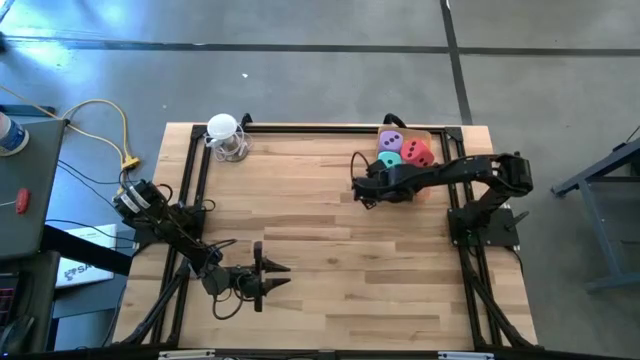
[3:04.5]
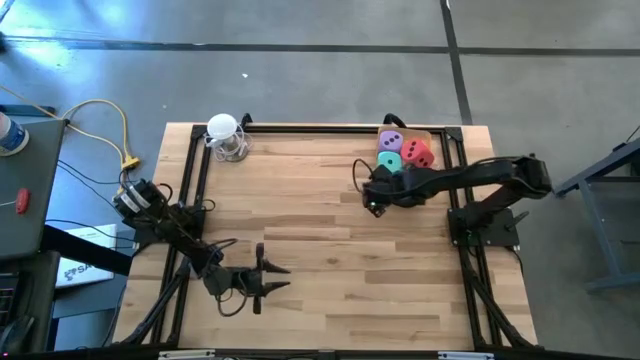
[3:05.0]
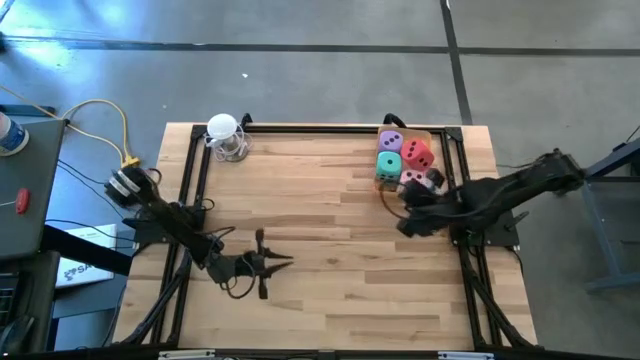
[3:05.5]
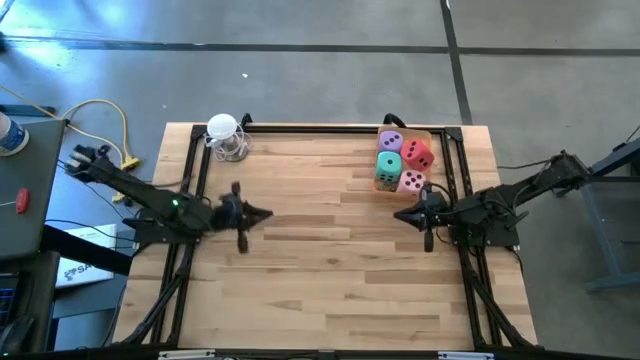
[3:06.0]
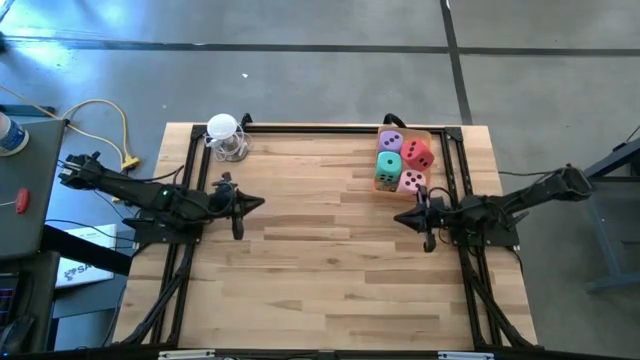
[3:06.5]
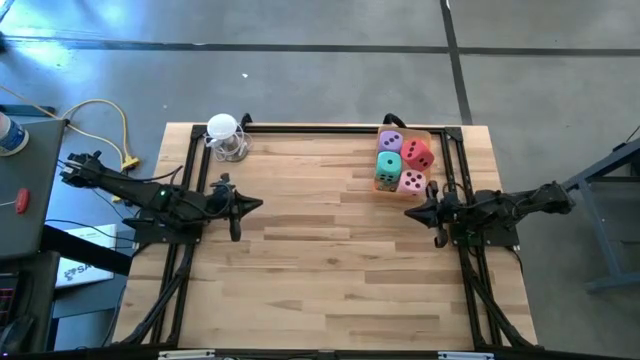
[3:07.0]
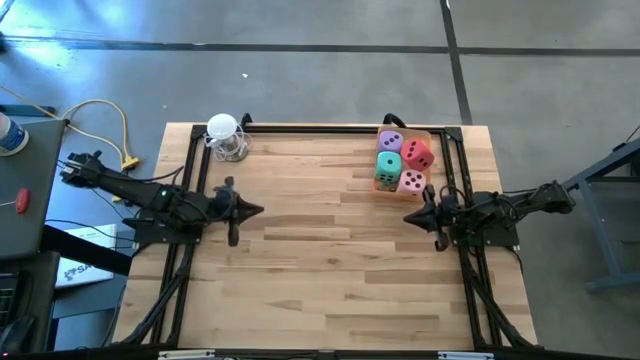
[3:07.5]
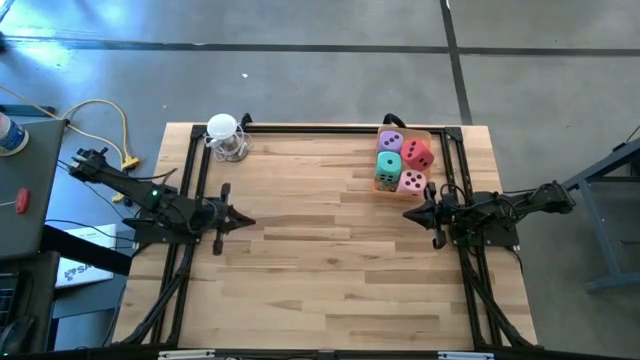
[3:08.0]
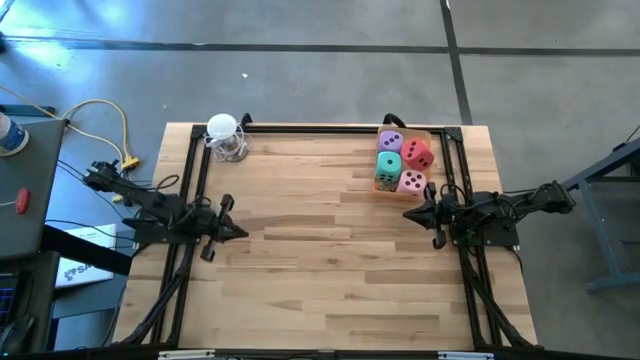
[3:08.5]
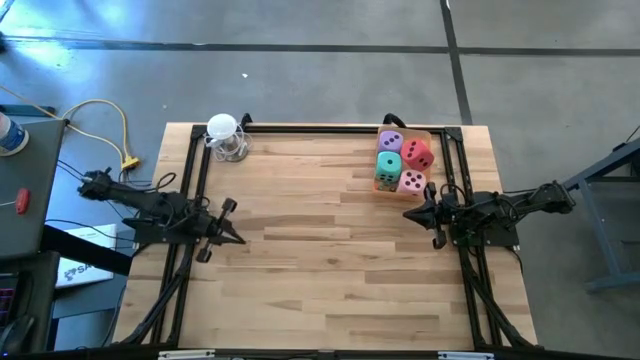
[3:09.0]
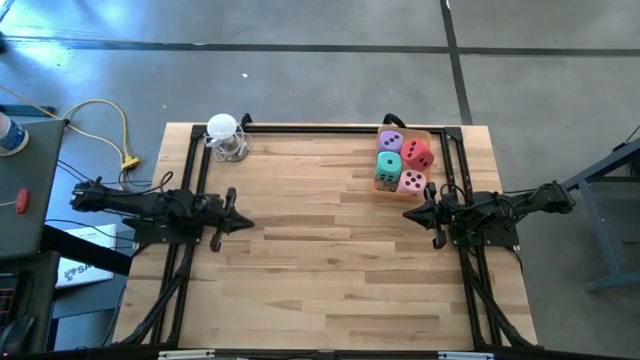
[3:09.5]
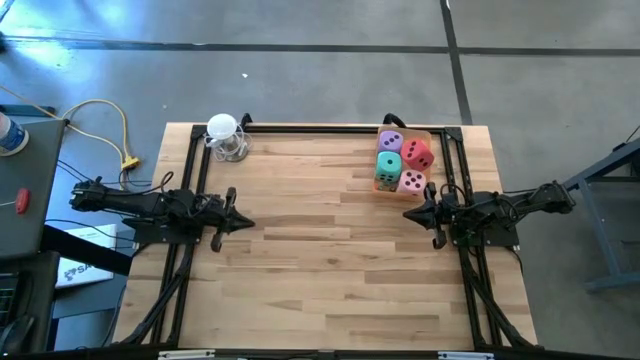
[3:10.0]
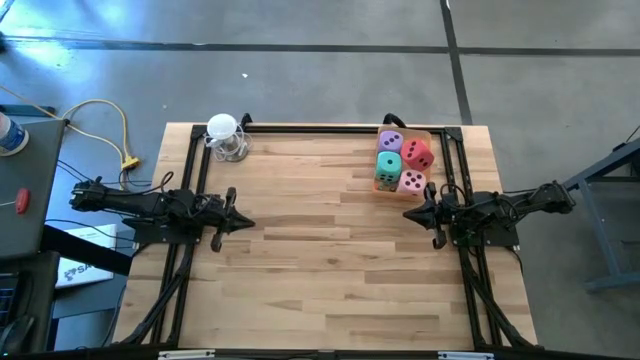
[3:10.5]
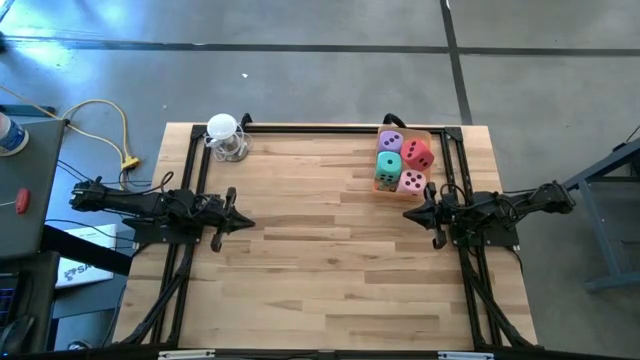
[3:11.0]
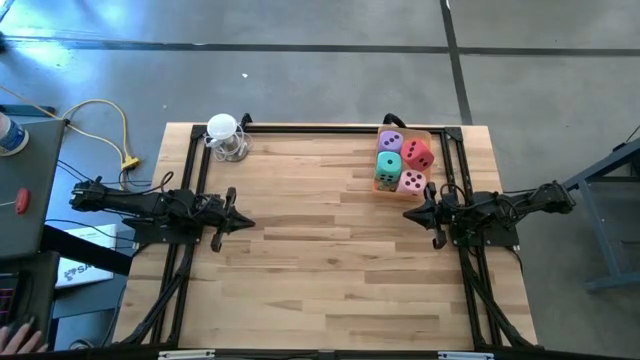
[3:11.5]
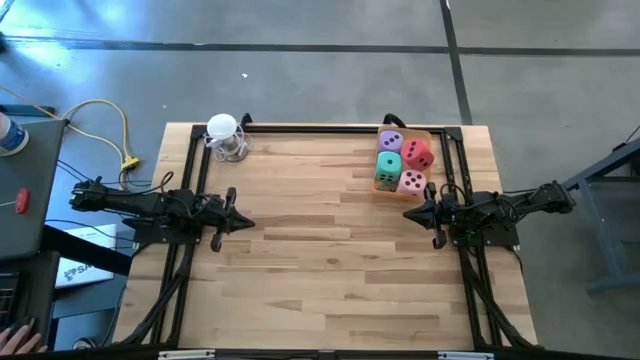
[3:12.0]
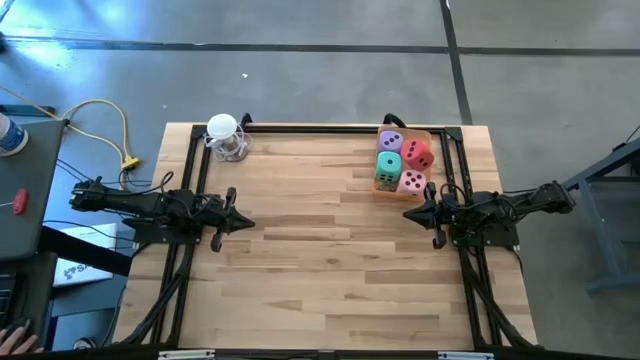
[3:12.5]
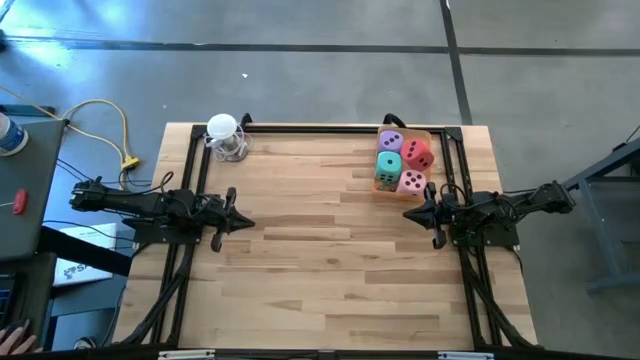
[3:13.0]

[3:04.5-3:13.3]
Task: Pick & Place Dice
Return to Home Position

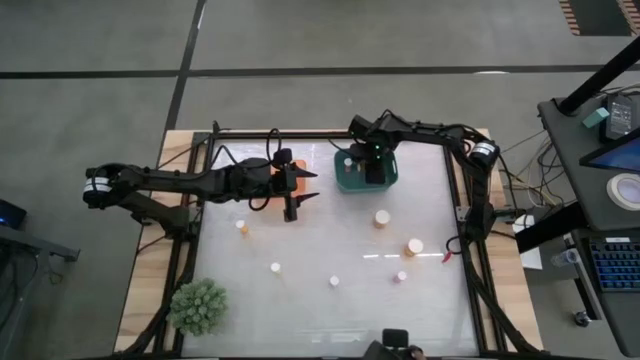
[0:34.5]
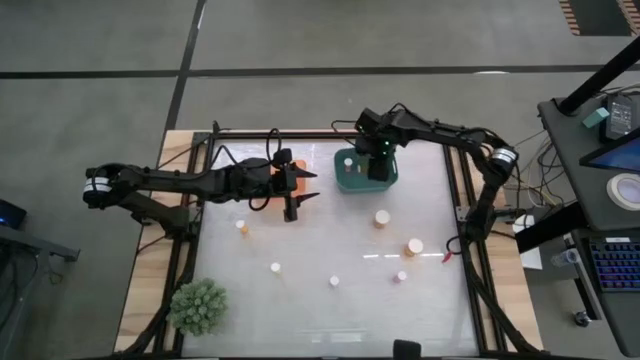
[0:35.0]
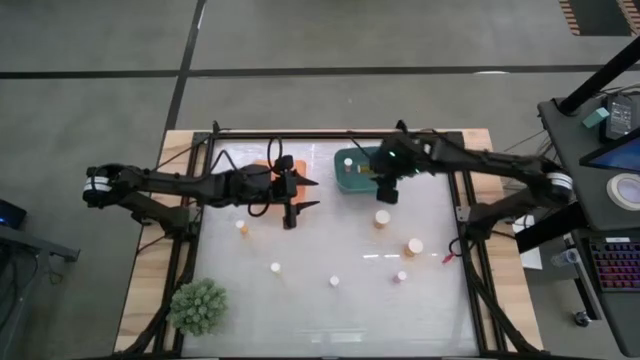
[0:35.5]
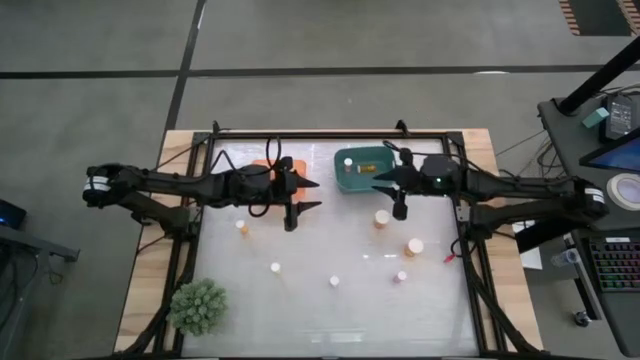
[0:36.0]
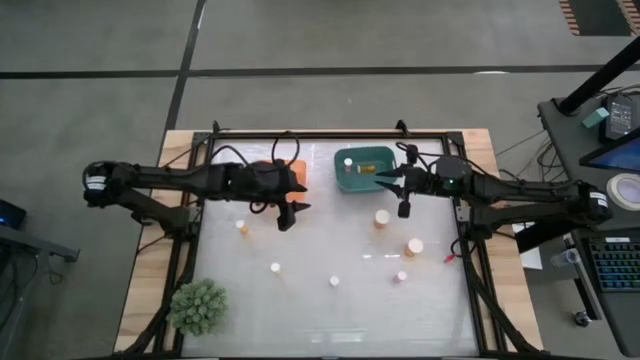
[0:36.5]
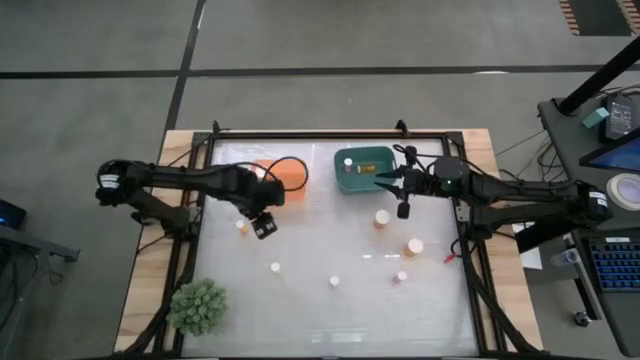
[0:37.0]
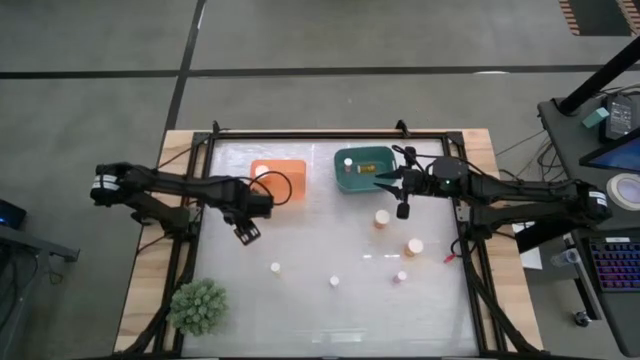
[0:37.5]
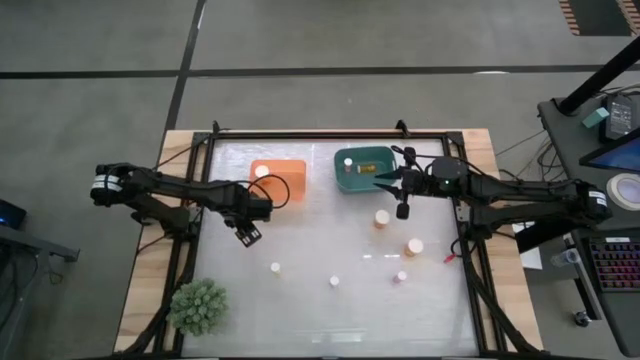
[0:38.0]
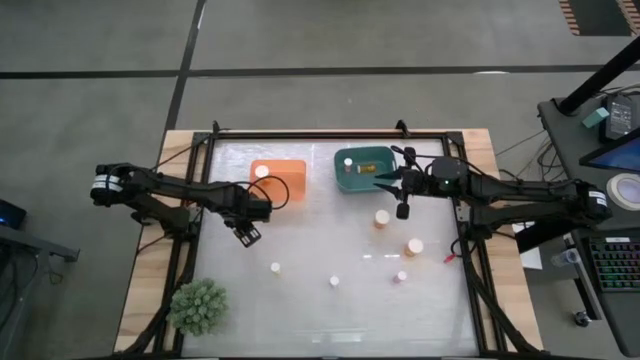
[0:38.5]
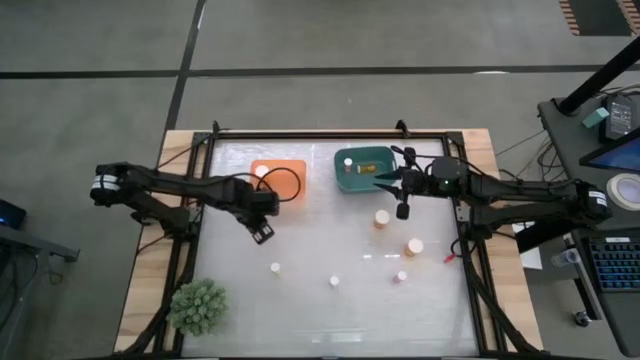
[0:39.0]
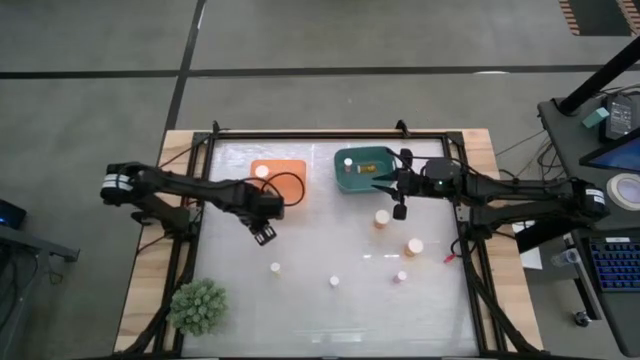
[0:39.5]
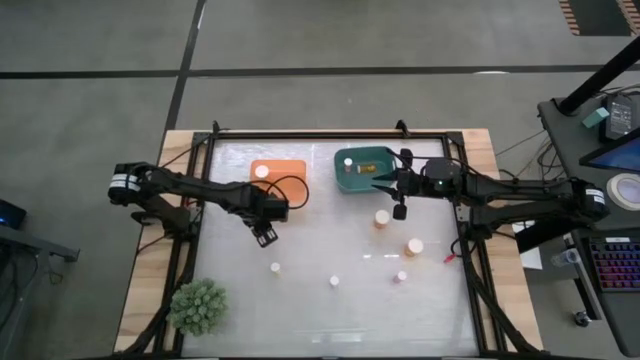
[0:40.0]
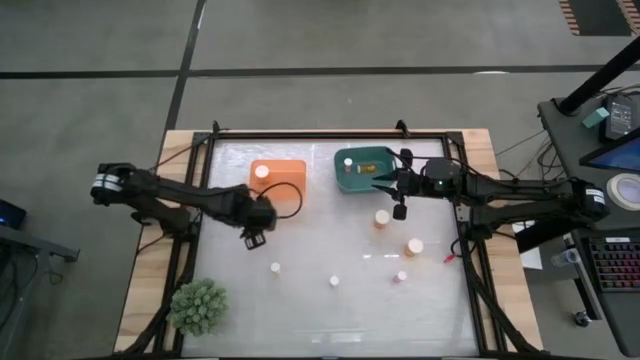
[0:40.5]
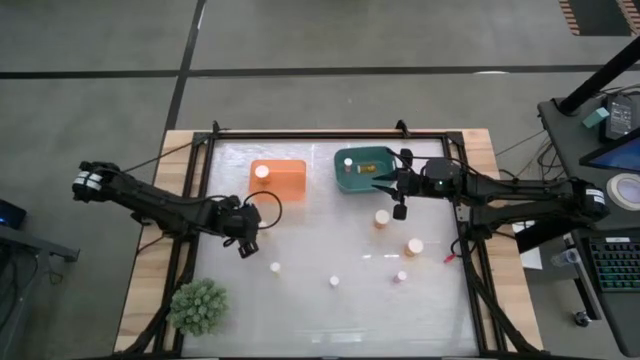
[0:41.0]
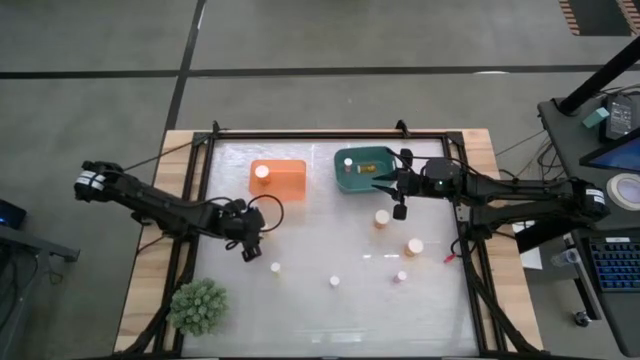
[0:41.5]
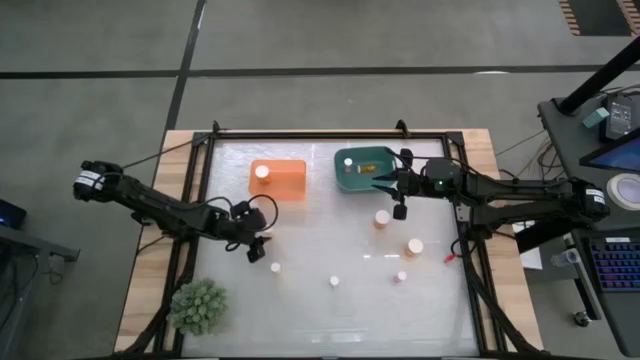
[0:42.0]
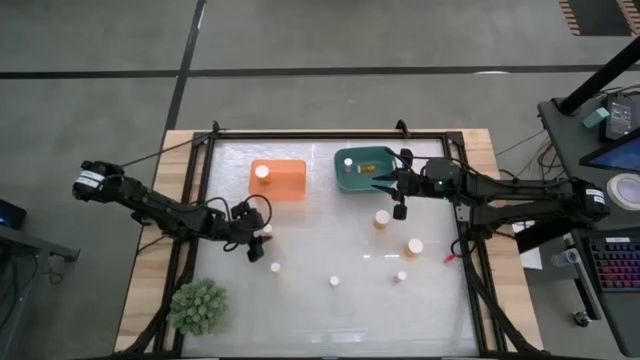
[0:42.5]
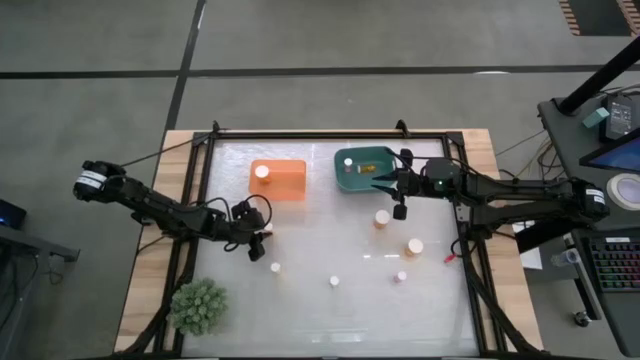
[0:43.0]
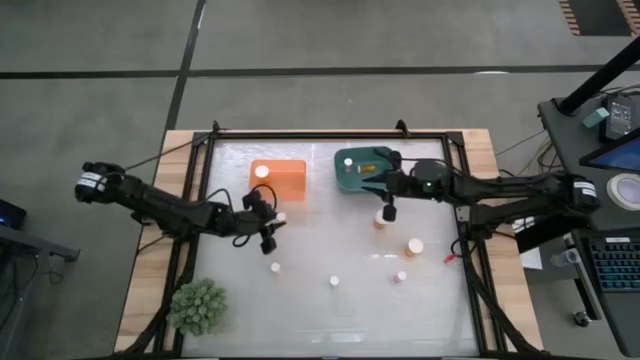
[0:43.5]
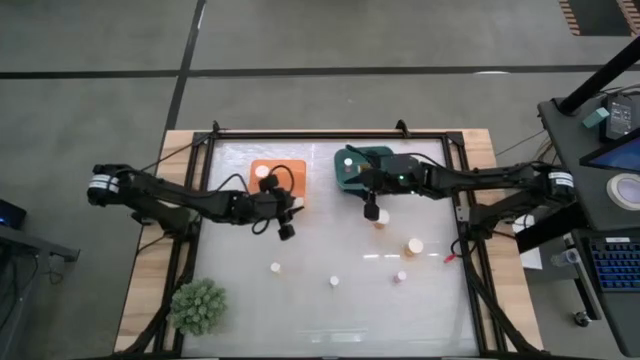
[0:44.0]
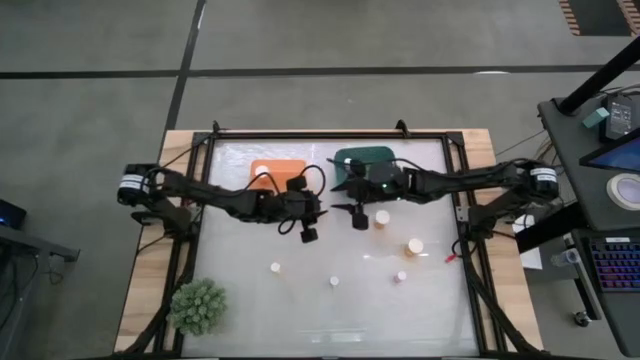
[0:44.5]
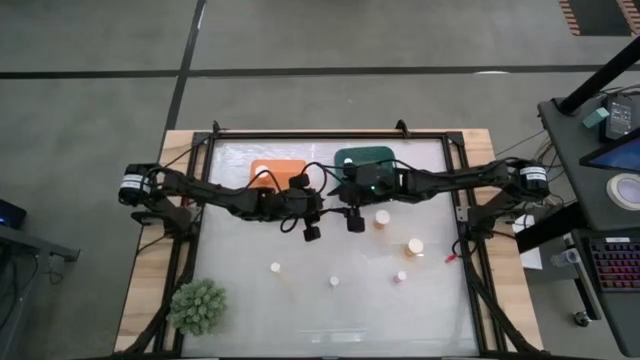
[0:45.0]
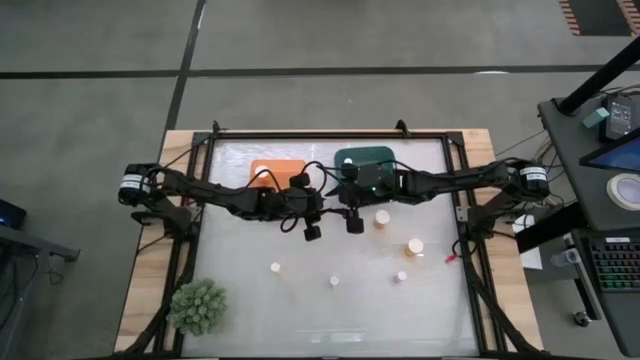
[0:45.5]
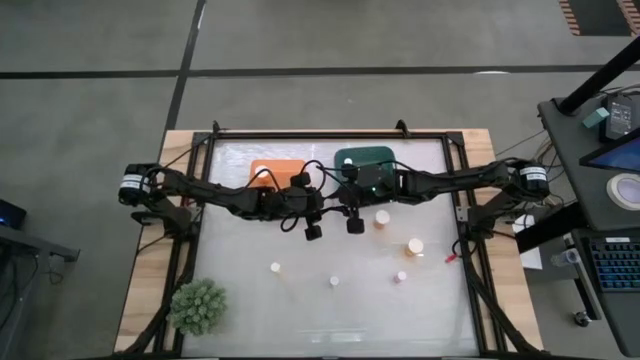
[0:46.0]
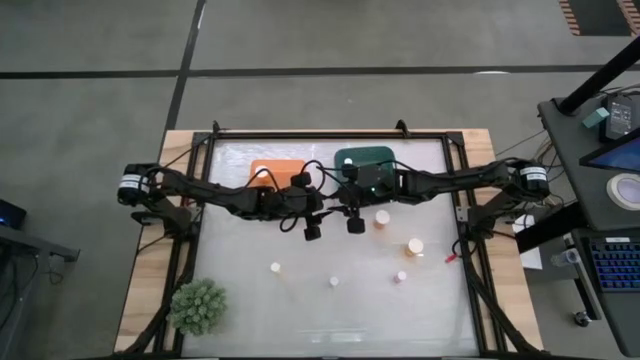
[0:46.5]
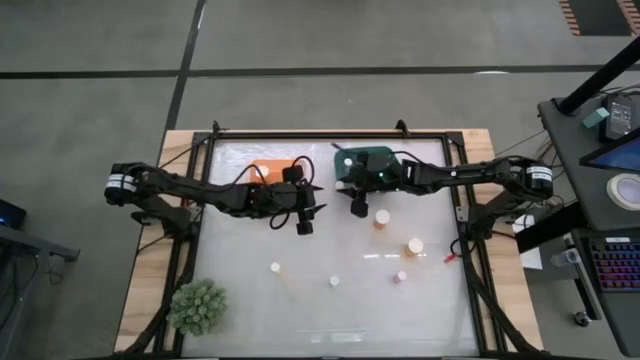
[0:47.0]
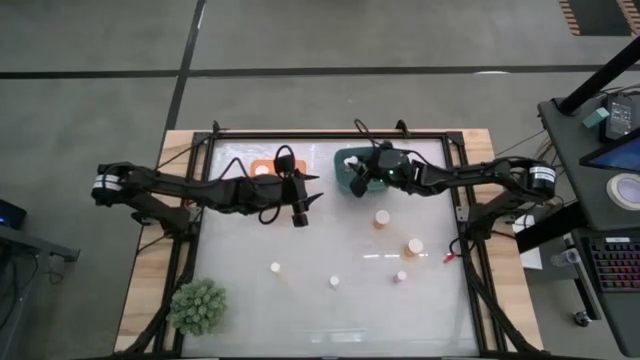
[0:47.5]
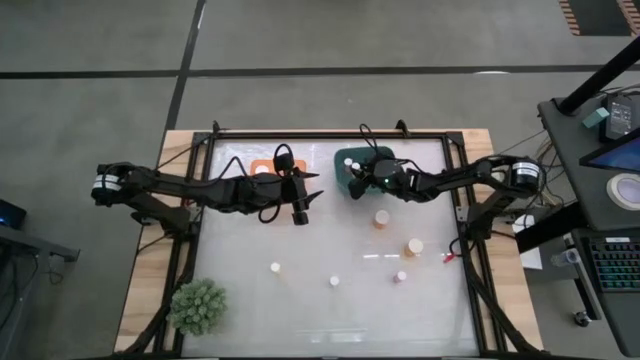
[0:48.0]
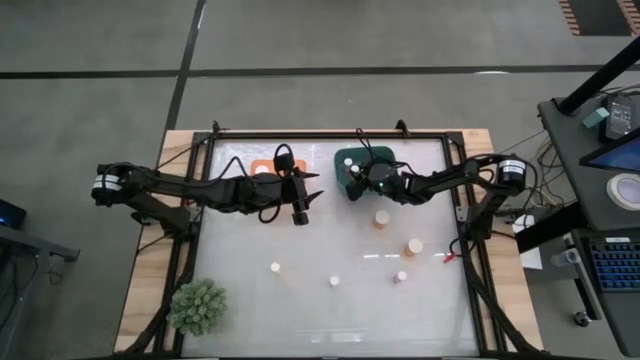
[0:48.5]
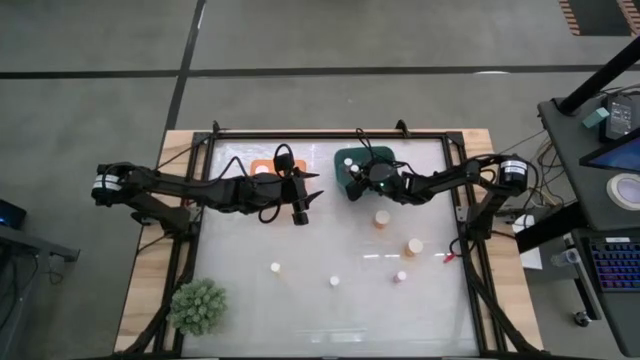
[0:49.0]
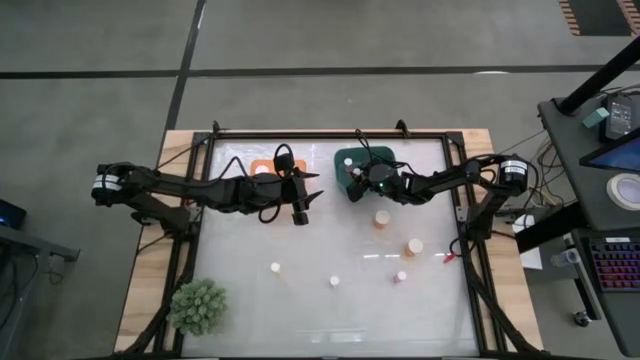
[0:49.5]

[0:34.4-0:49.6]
Task: Pick and place medicine bottles into bin by pill shape (circle, oval)
Put the small orange pill bottle into the green bin
